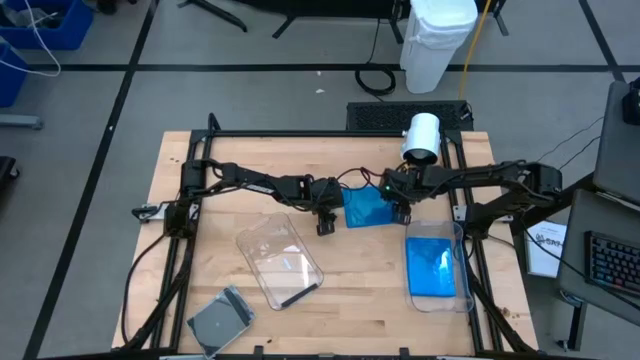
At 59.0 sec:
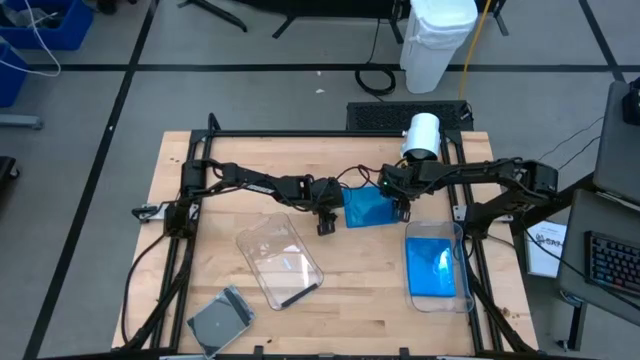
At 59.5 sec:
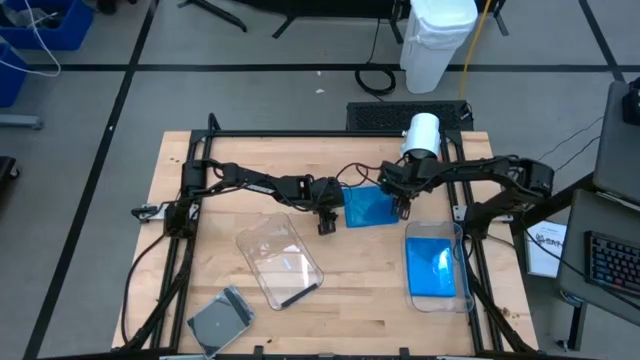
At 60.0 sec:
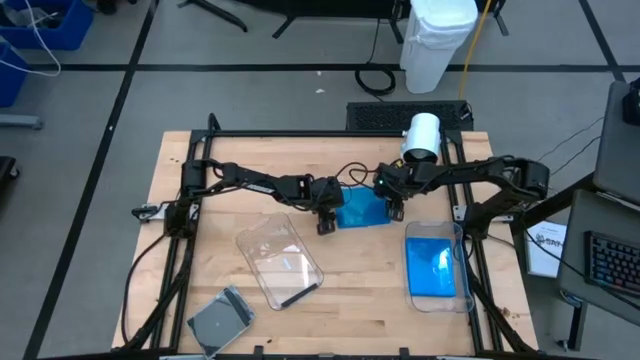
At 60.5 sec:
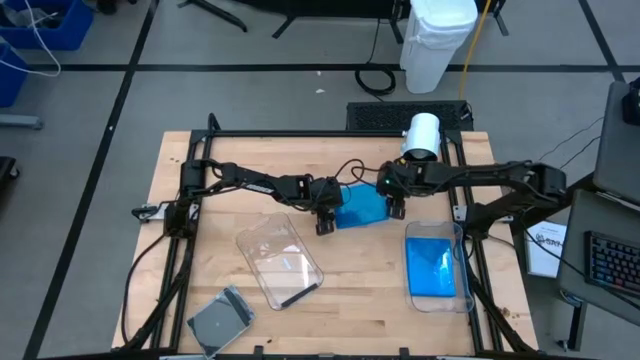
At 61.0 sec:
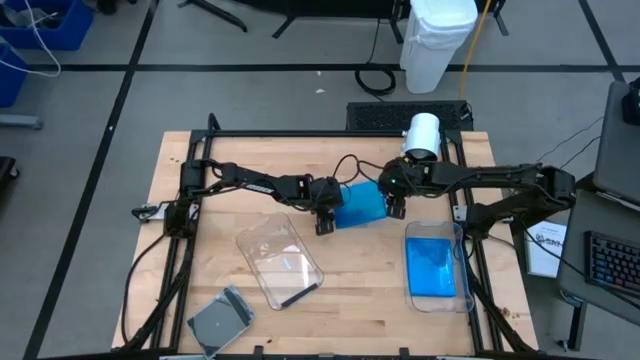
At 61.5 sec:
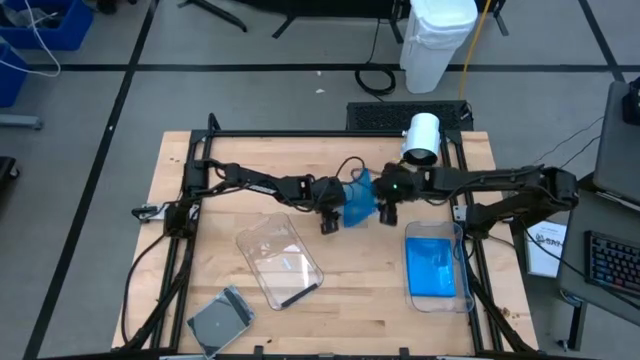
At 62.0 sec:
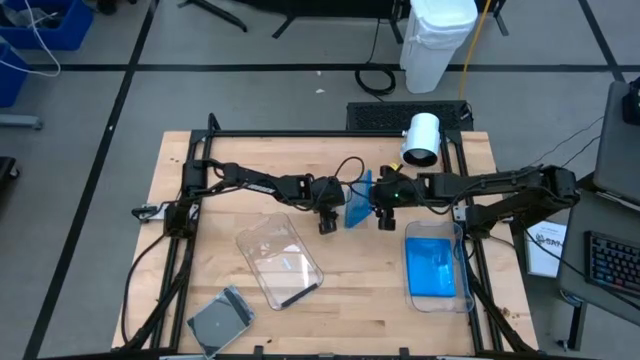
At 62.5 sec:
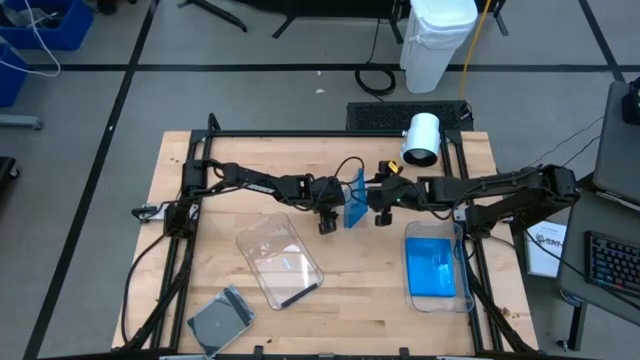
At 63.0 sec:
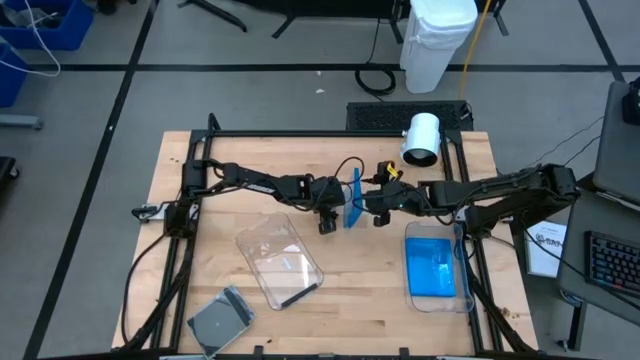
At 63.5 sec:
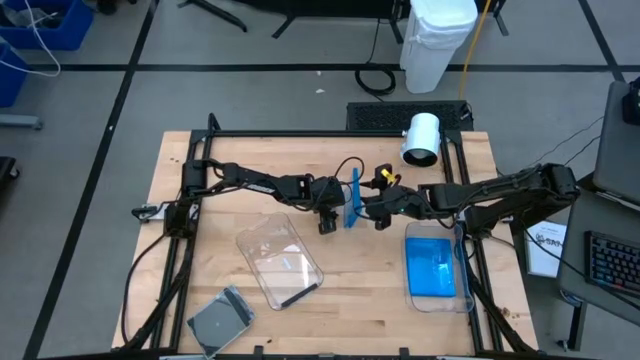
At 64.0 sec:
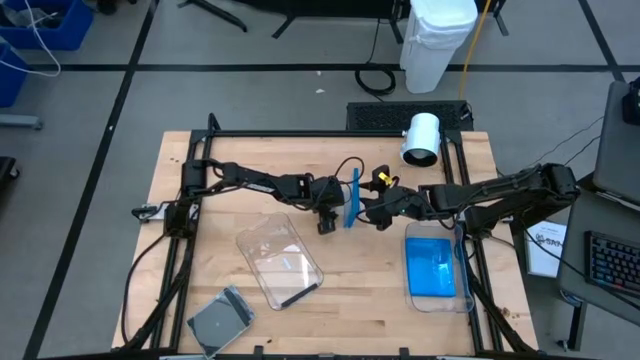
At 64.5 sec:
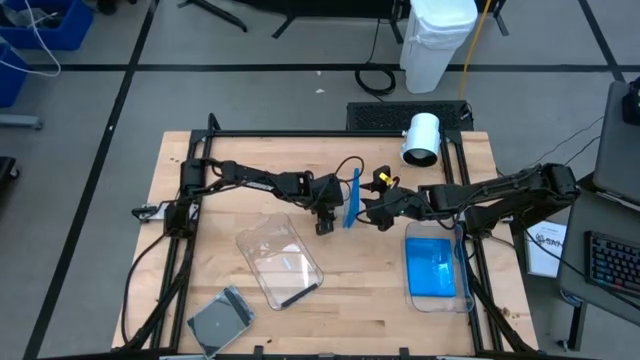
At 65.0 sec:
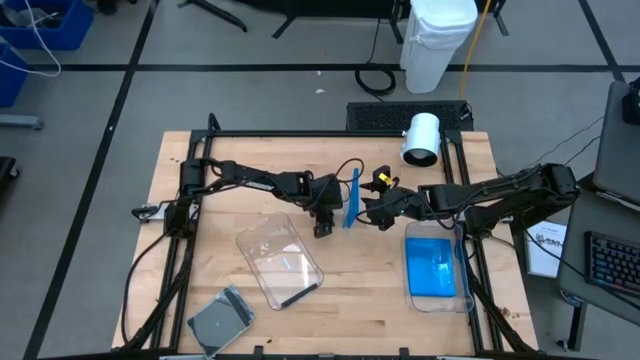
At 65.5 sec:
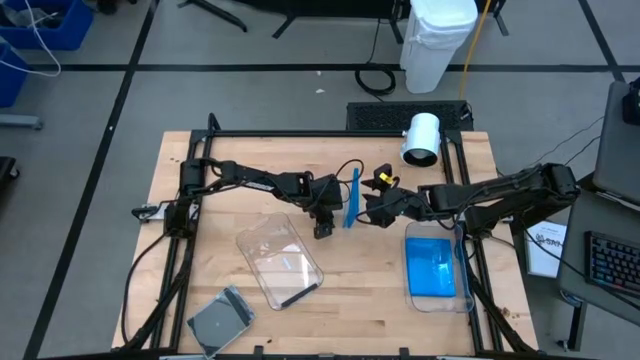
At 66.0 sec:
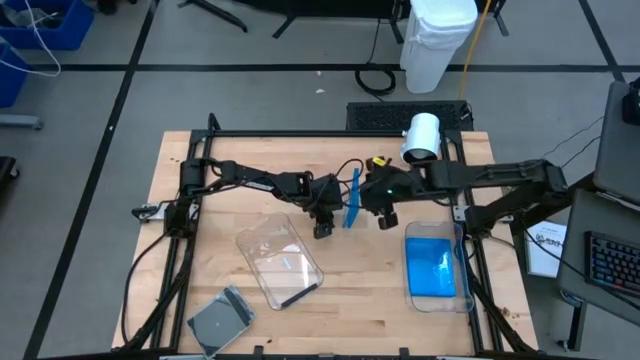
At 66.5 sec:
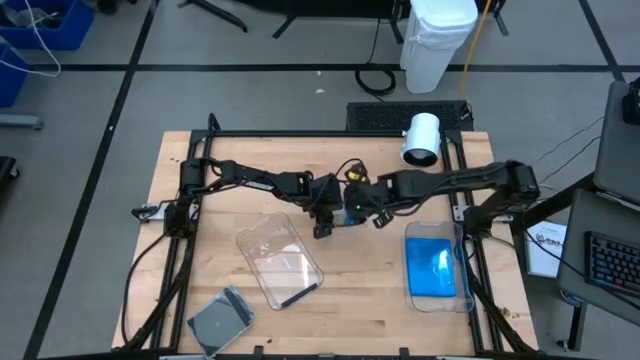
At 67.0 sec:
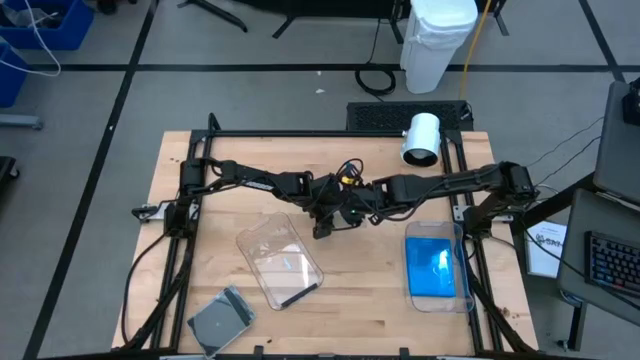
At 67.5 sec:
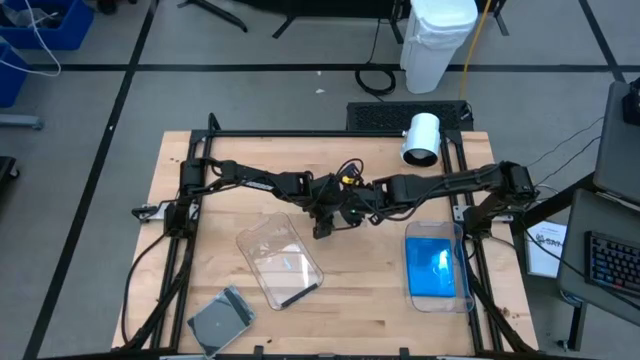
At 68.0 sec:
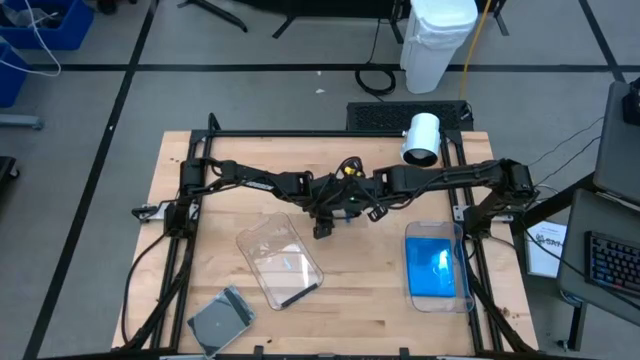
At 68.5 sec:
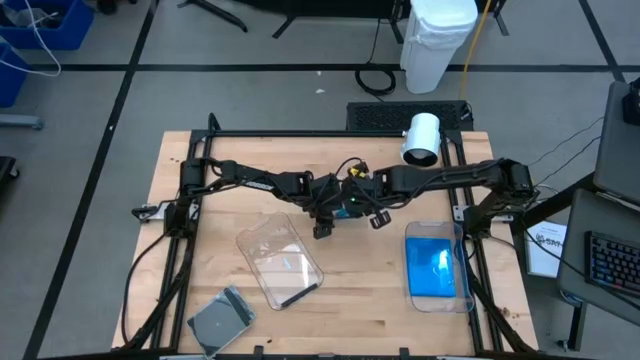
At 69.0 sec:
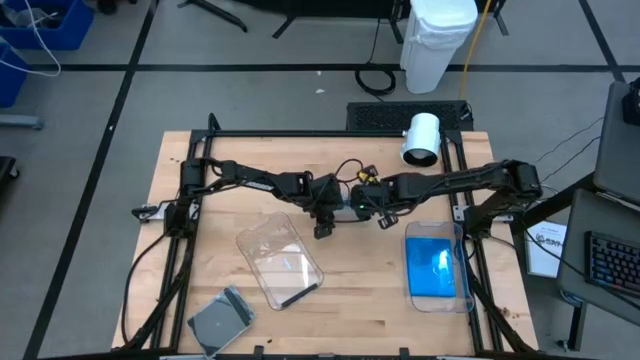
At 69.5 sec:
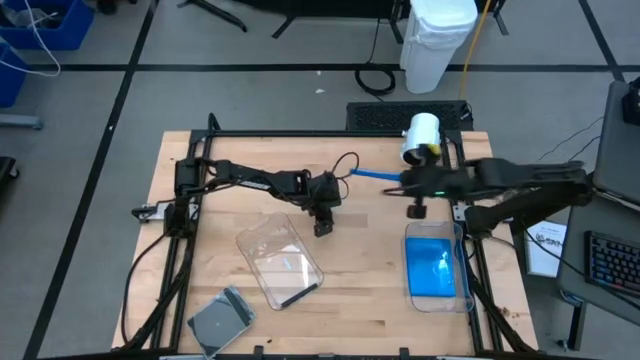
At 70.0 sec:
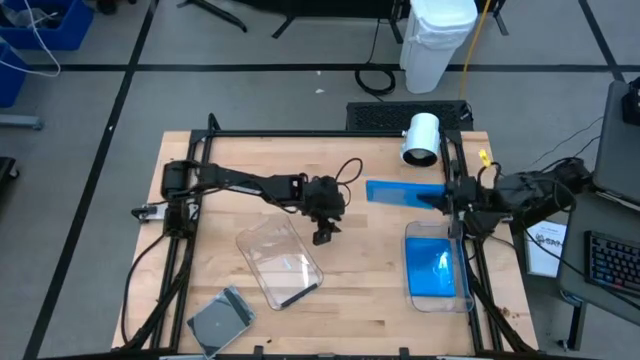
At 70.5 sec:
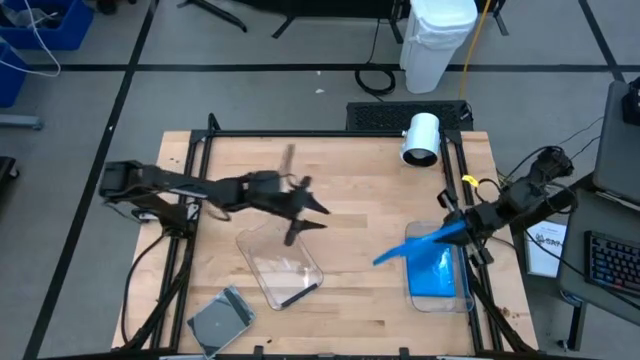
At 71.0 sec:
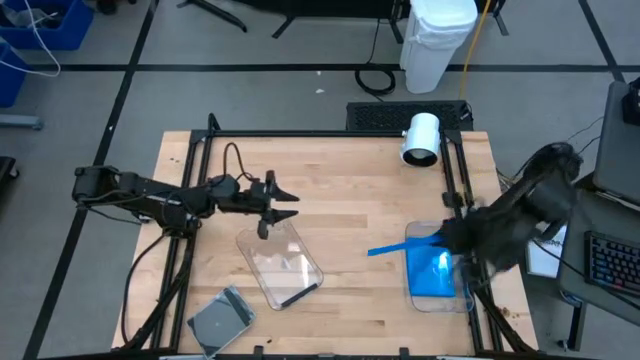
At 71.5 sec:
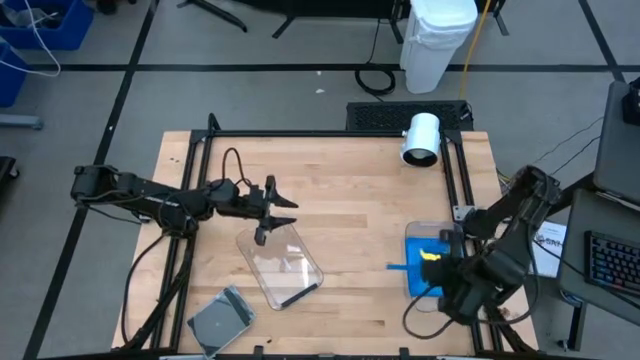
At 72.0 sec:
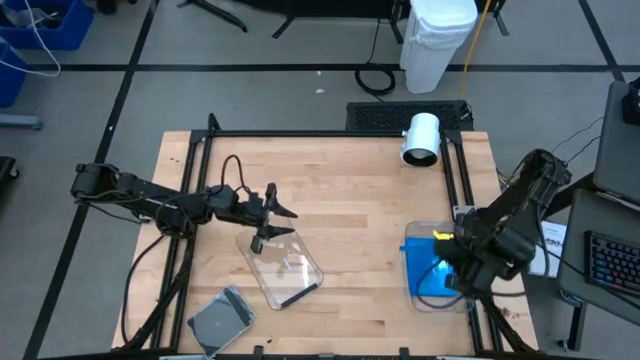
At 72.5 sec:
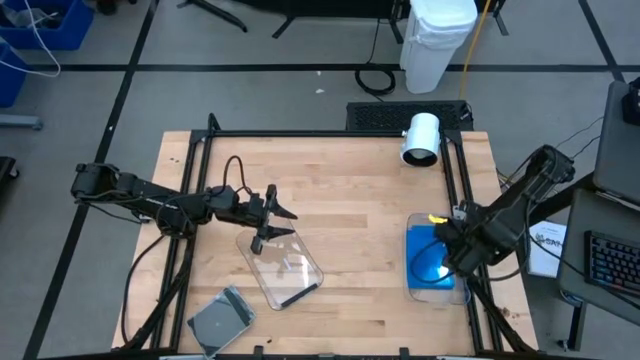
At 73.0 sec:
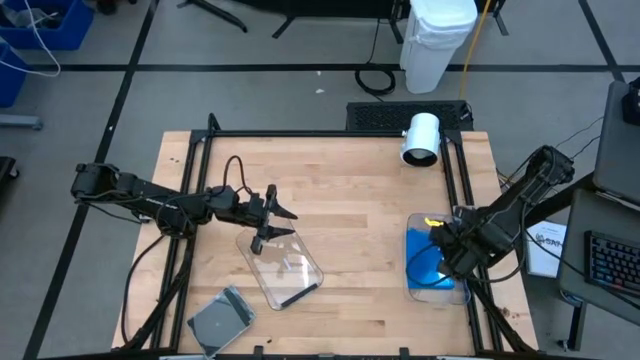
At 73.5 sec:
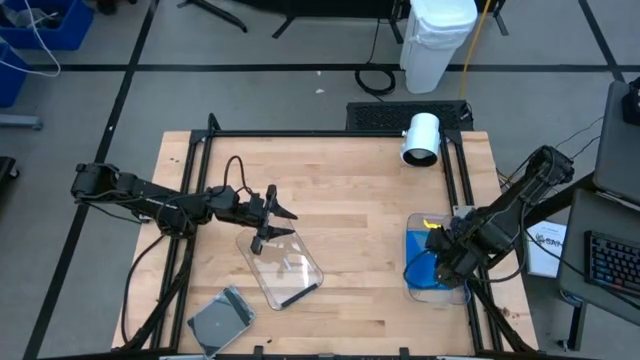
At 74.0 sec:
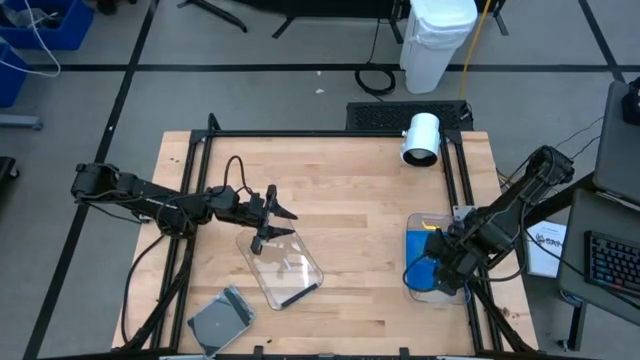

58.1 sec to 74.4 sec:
Task: Pick & place jewel cases by type
Put the blue disc case into the right transparent bin

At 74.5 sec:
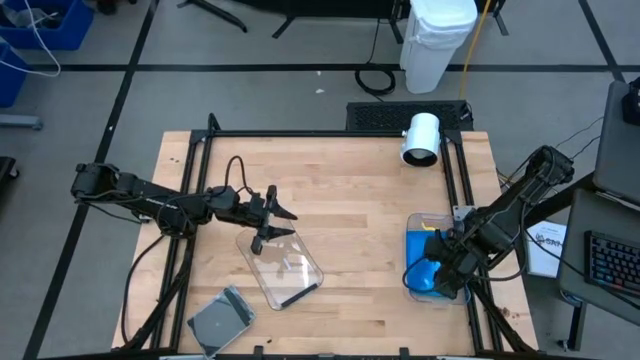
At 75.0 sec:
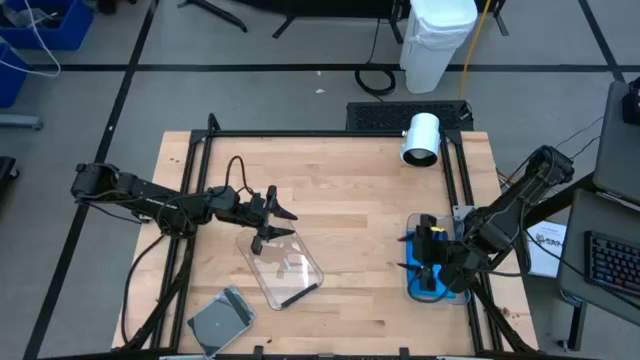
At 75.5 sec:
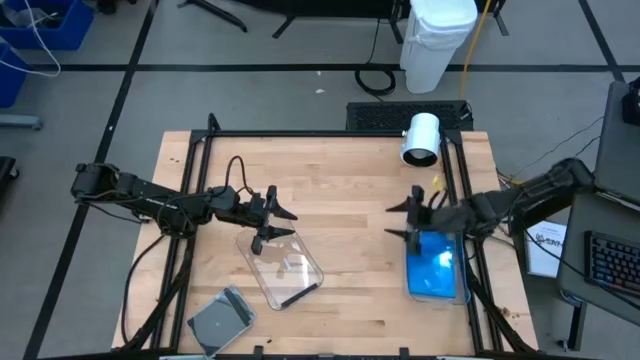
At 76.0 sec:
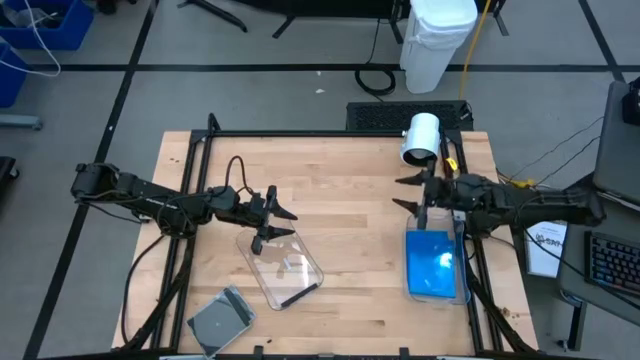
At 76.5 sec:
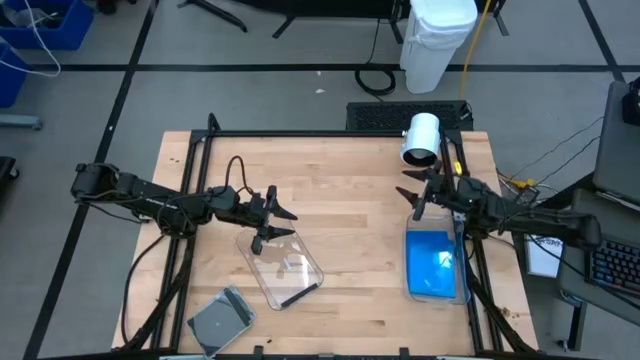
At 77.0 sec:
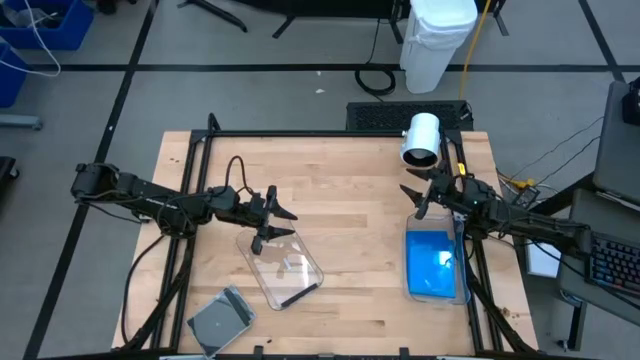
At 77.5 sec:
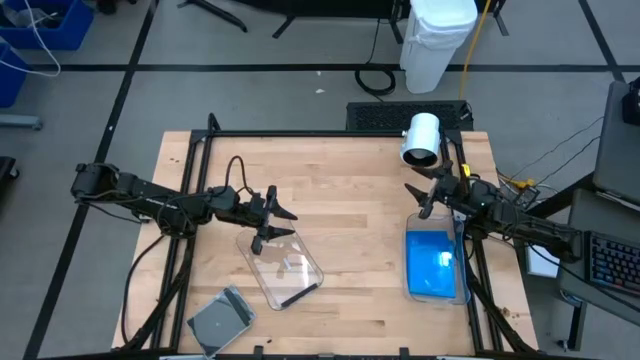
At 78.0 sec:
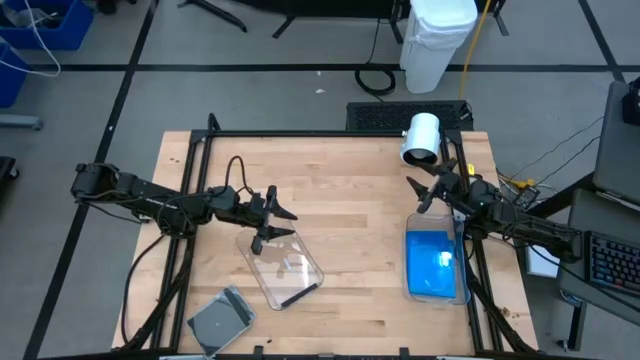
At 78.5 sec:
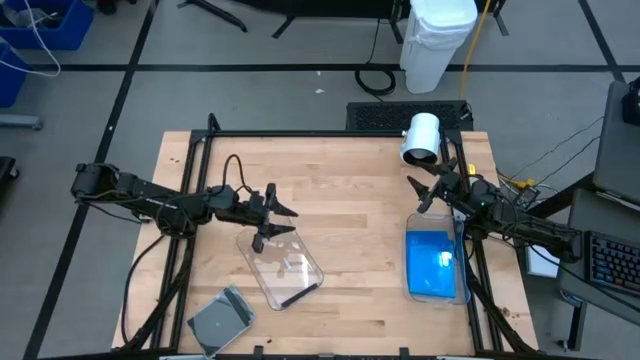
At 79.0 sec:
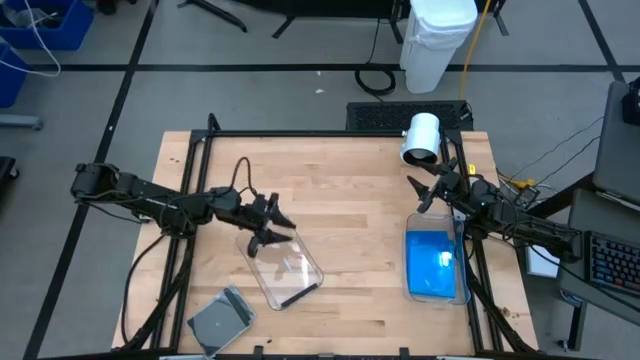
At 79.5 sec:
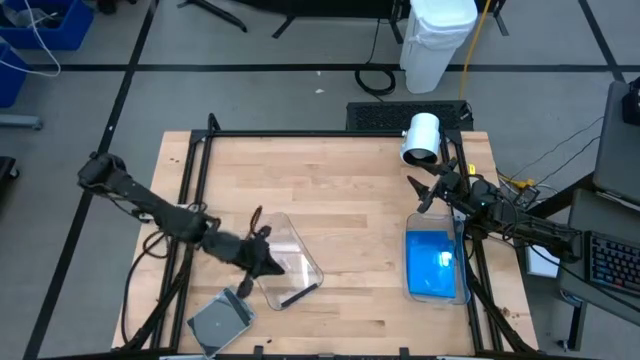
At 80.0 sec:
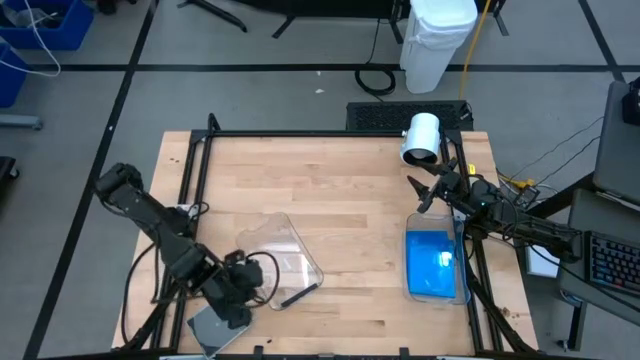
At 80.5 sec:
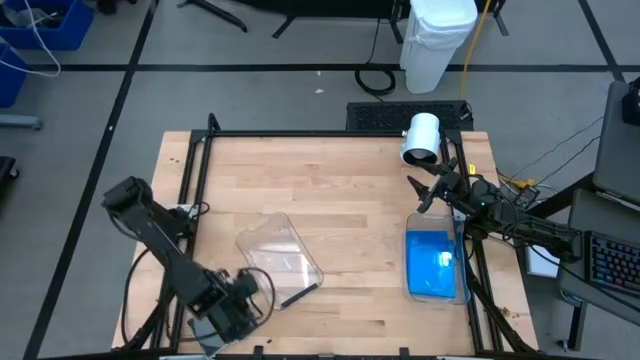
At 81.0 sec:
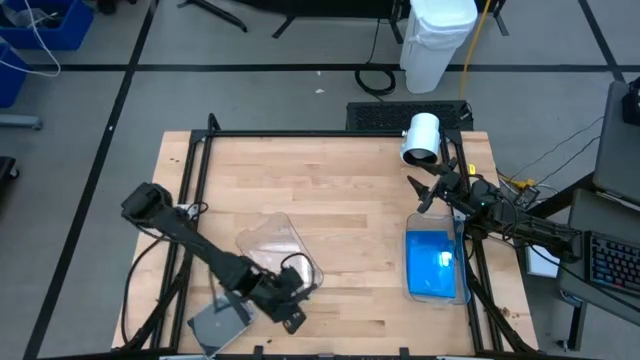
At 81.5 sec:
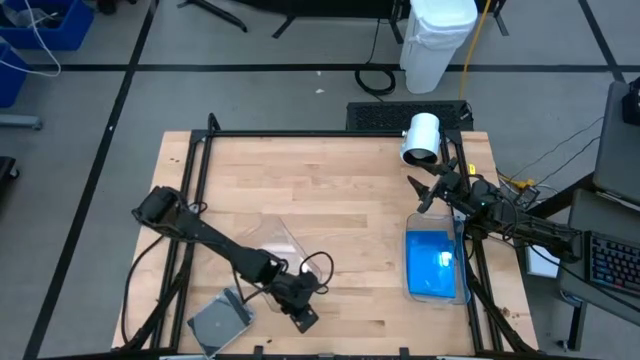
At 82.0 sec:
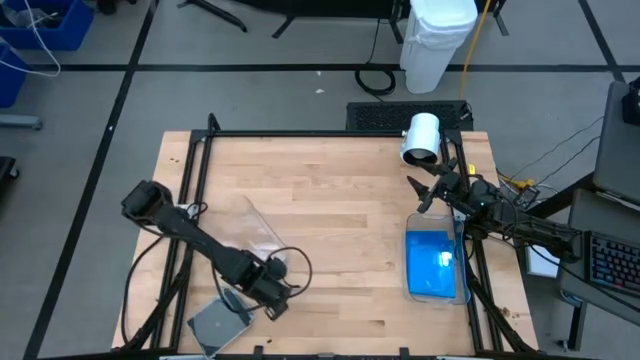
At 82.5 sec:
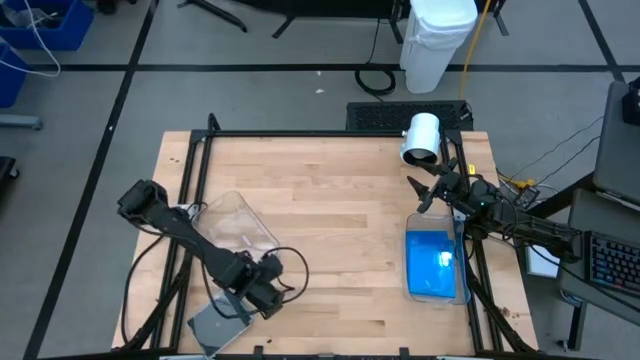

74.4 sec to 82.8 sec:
Adjust the left transparent bin
